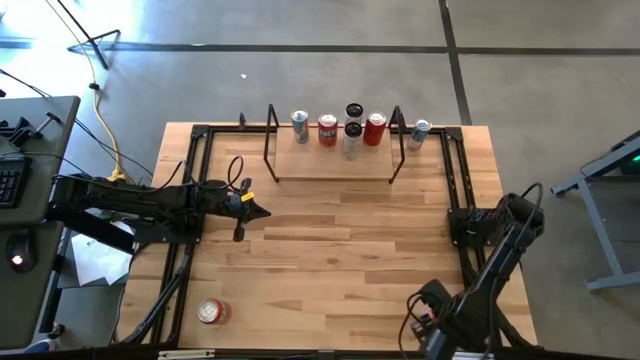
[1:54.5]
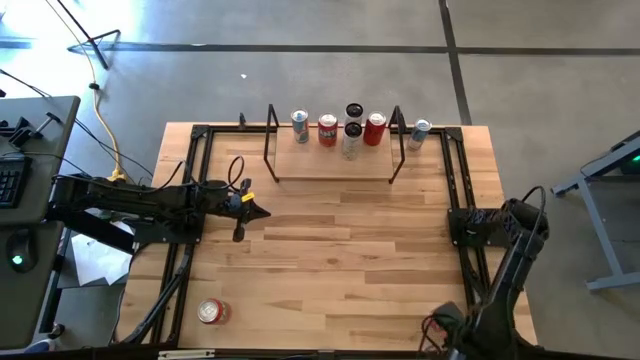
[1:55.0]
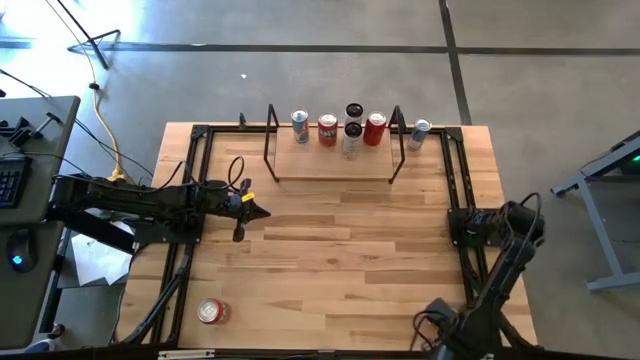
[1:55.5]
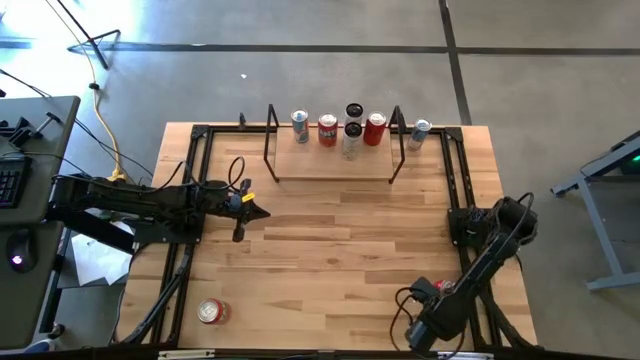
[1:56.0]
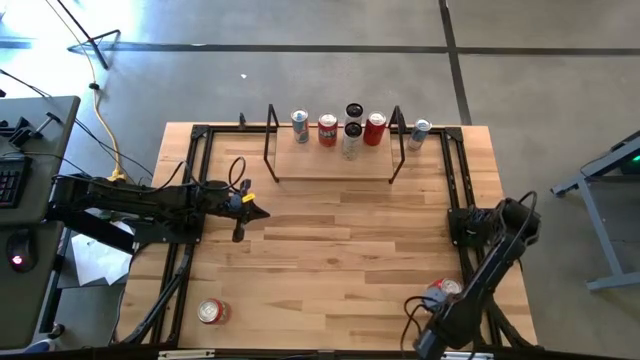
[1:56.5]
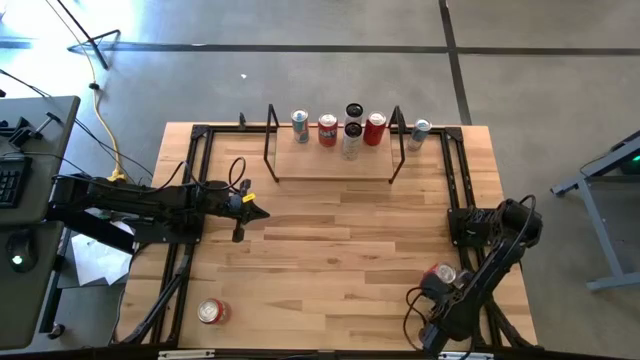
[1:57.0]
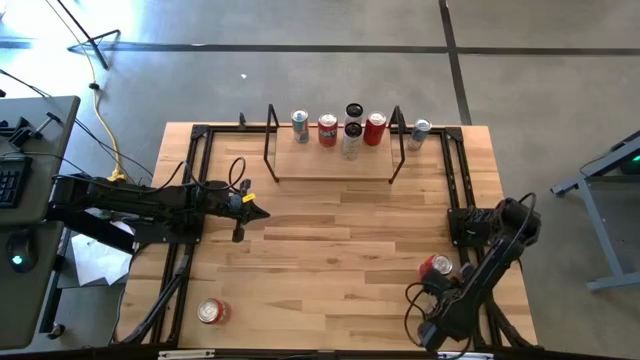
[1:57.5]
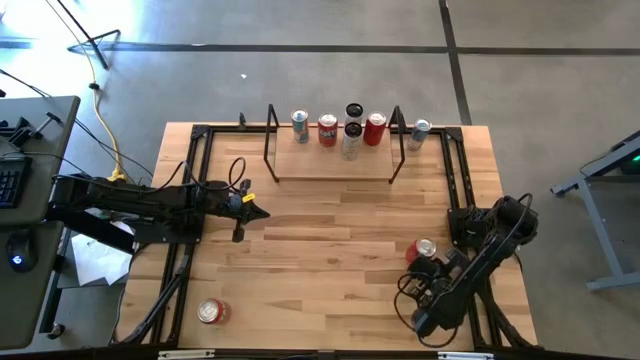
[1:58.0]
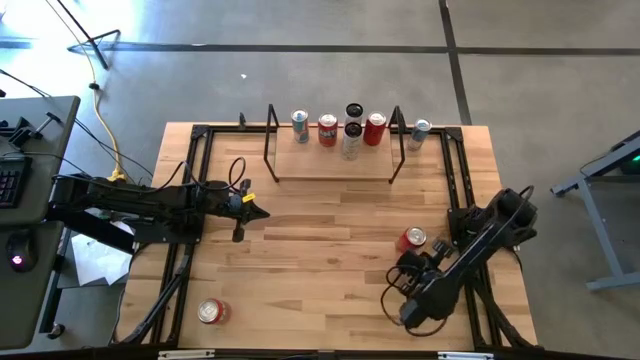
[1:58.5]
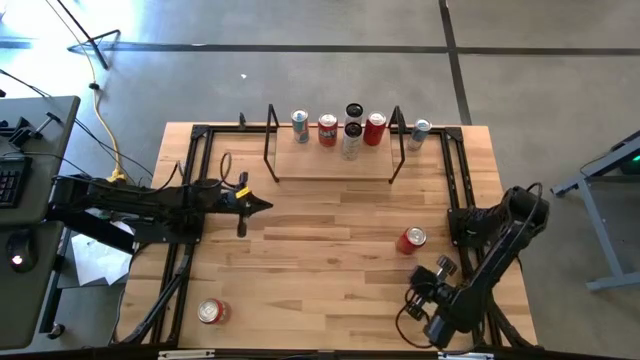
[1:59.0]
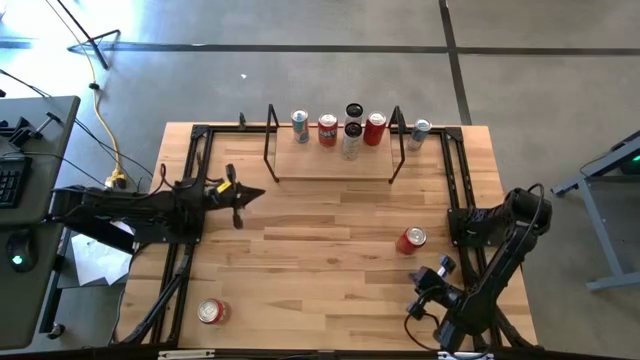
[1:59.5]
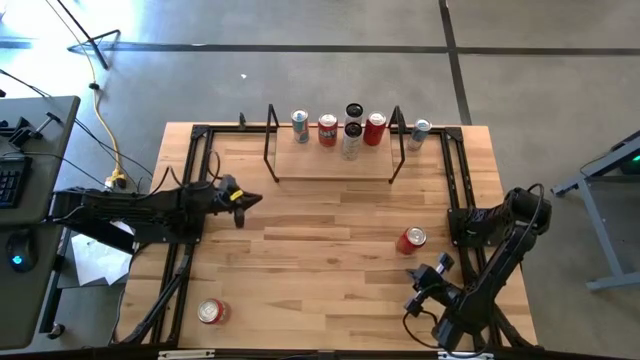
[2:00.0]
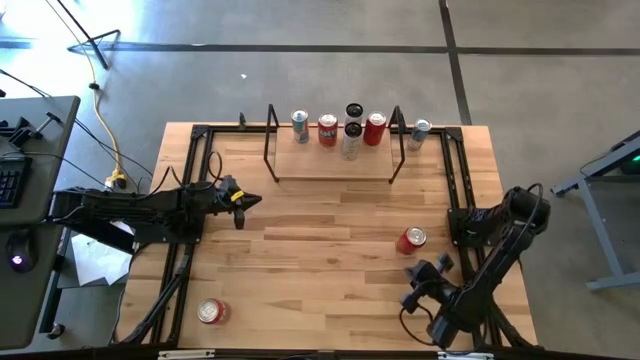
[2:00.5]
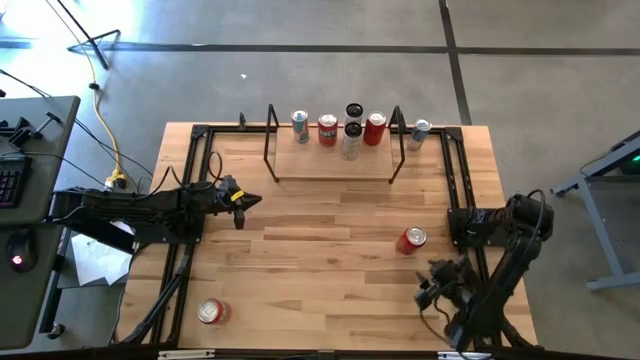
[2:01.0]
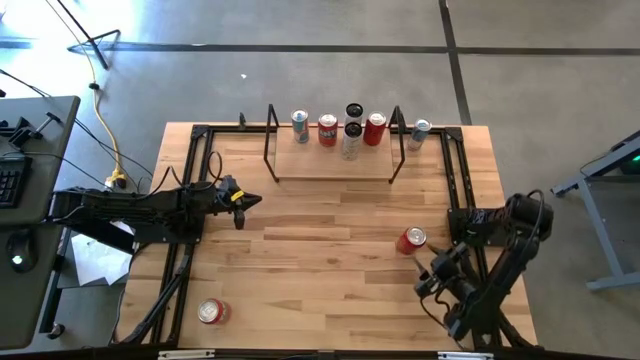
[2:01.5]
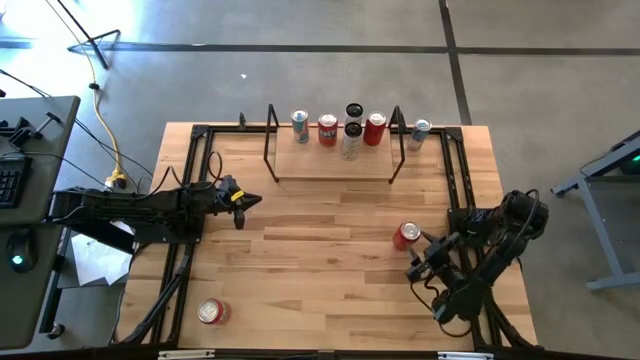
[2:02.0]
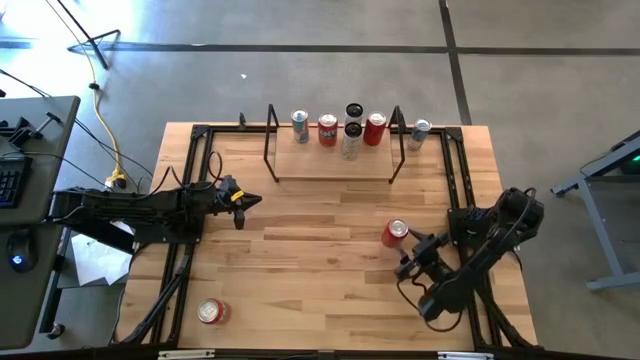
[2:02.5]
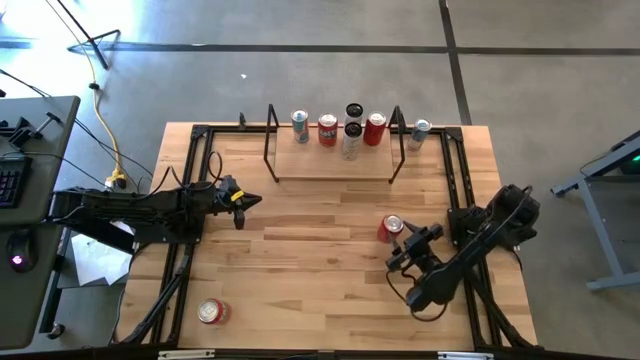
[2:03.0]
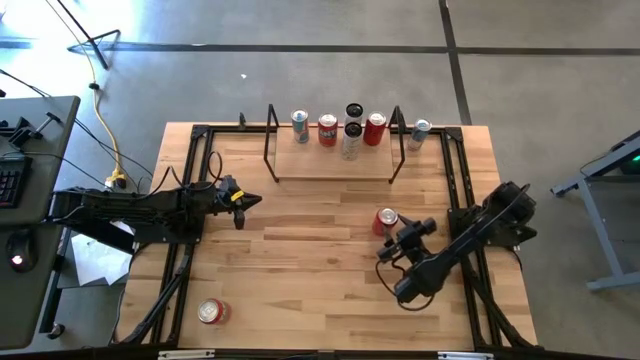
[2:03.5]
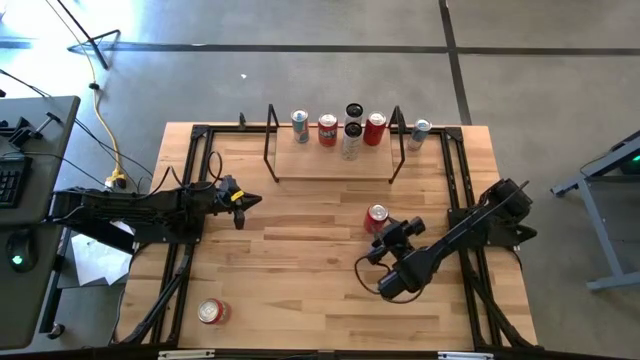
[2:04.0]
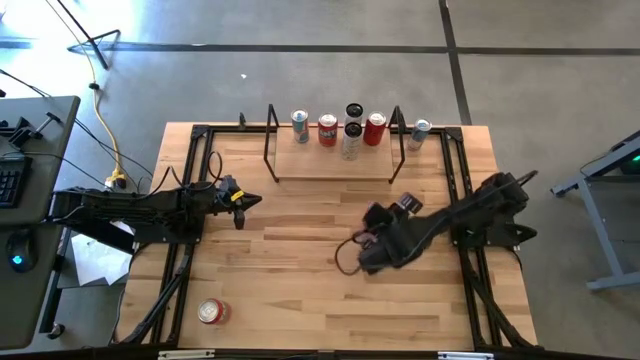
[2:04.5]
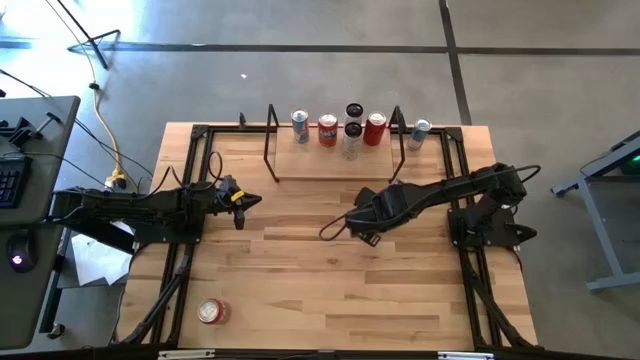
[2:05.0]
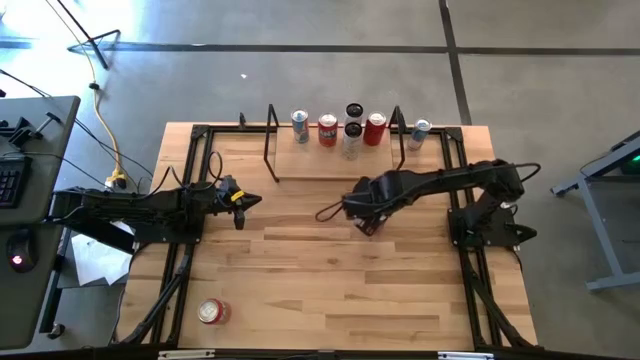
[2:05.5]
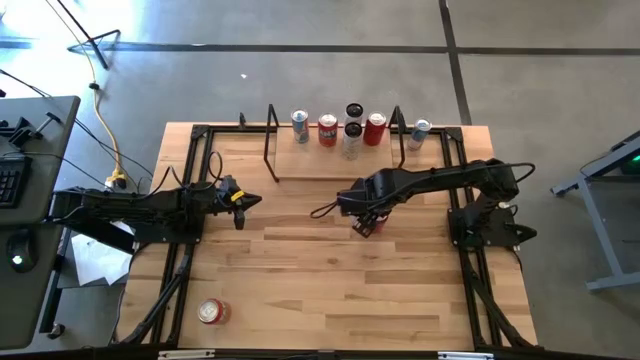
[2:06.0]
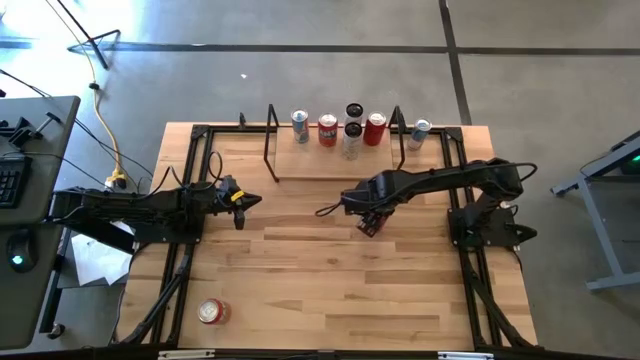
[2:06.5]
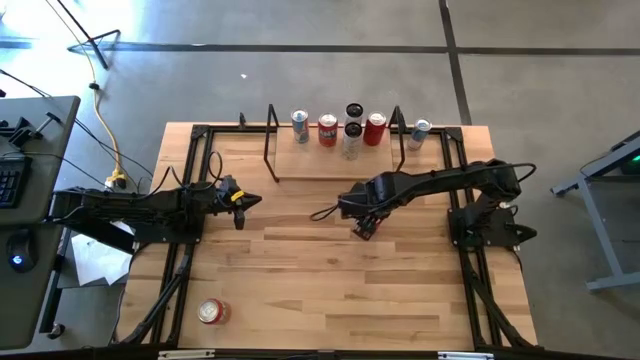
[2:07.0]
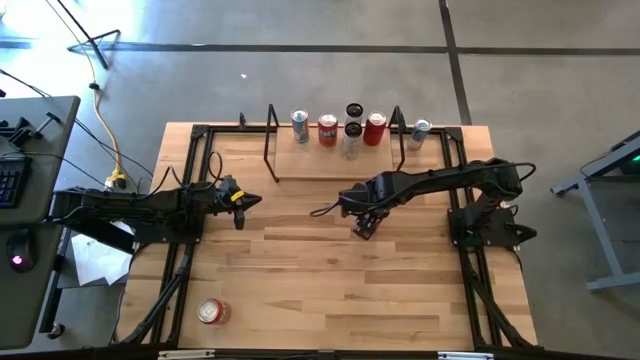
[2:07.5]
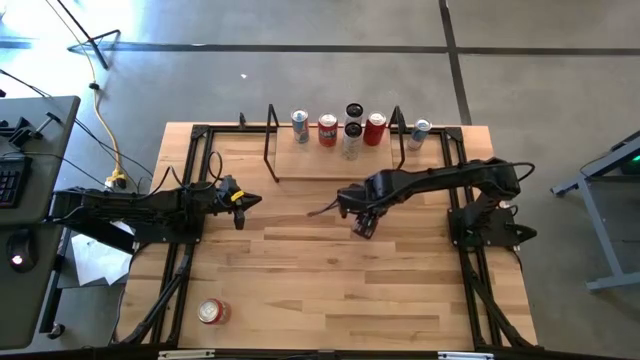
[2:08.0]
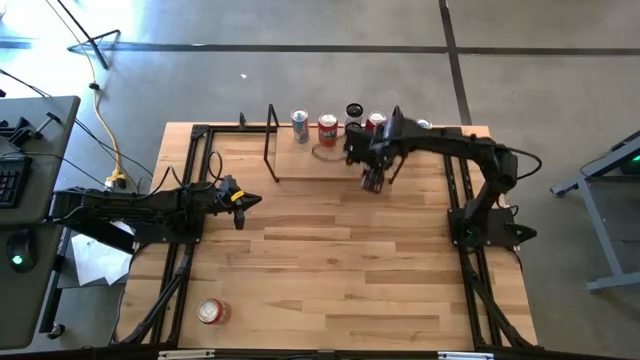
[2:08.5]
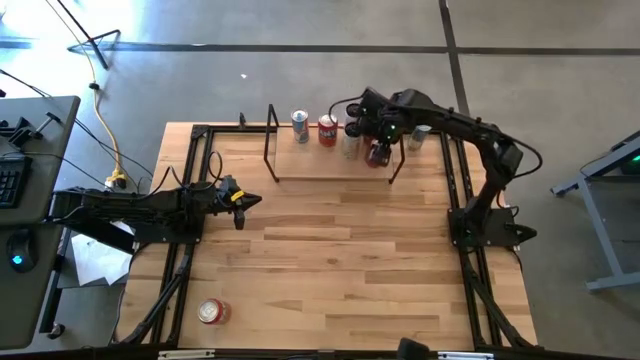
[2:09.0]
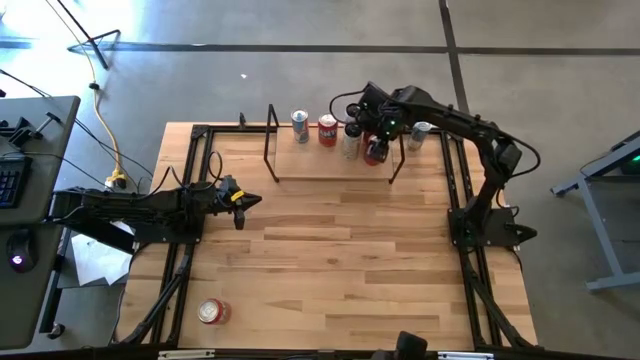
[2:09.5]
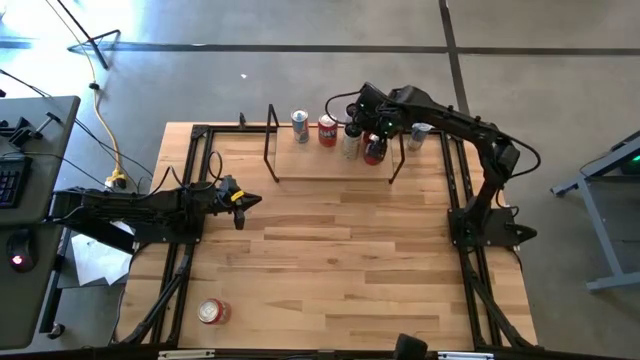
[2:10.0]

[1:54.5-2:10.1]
Task: Place canned beverage on shelf
Put the red-black soda can on the shelf aligned with the other red-black soda can

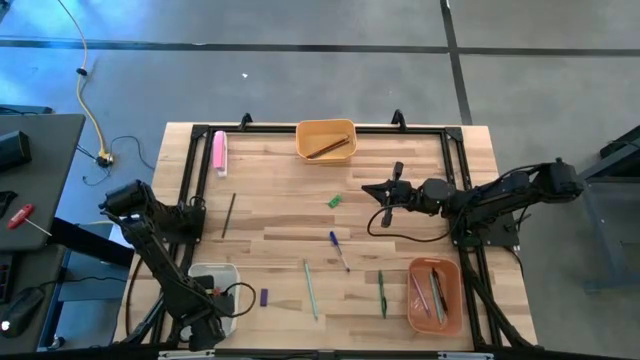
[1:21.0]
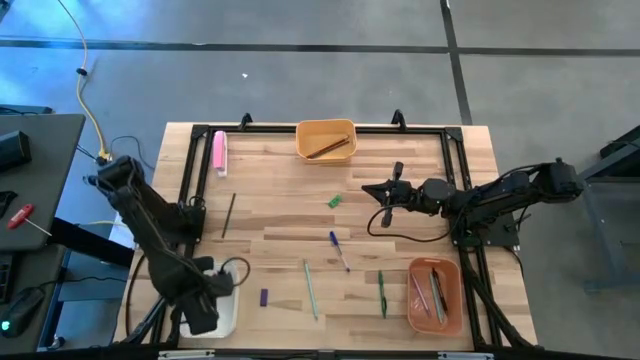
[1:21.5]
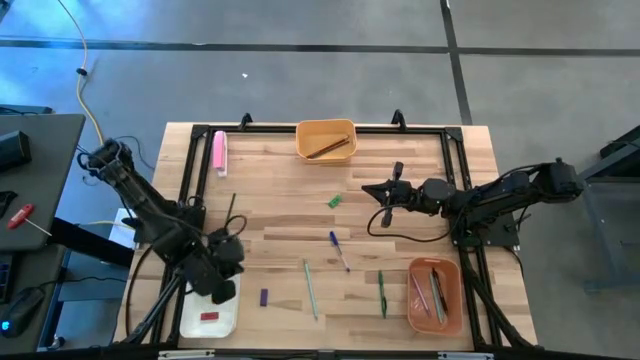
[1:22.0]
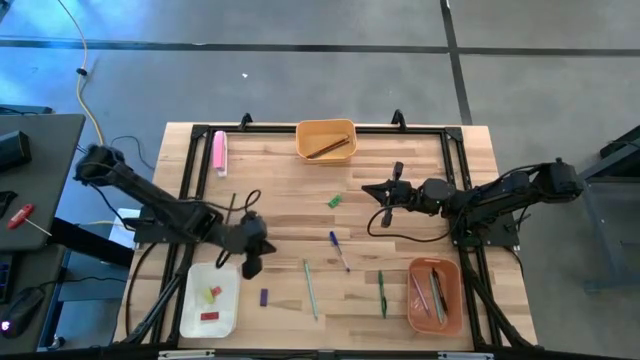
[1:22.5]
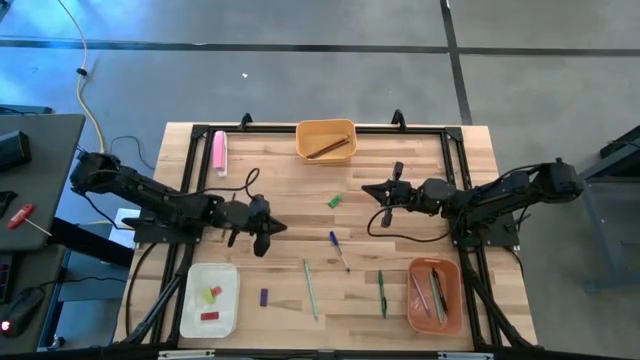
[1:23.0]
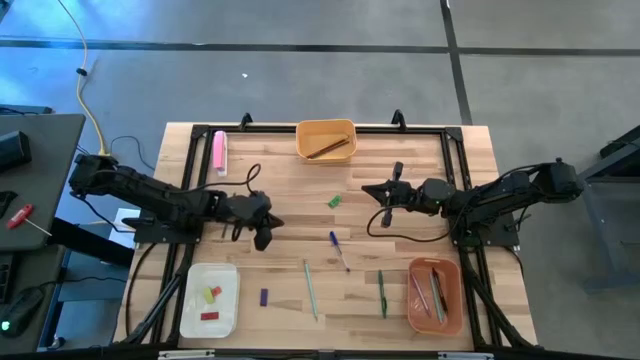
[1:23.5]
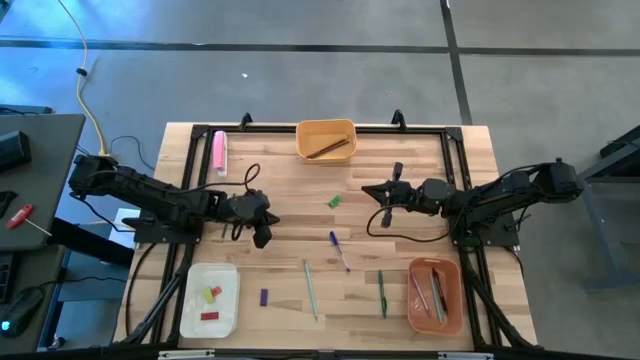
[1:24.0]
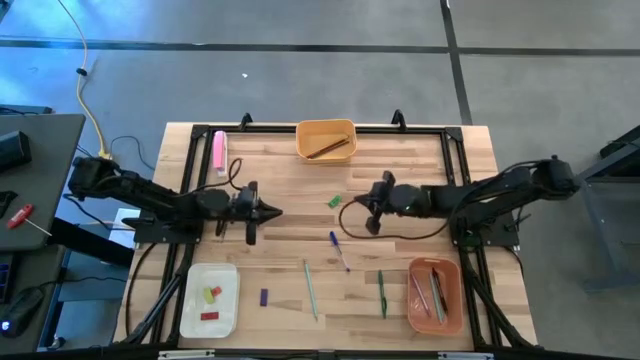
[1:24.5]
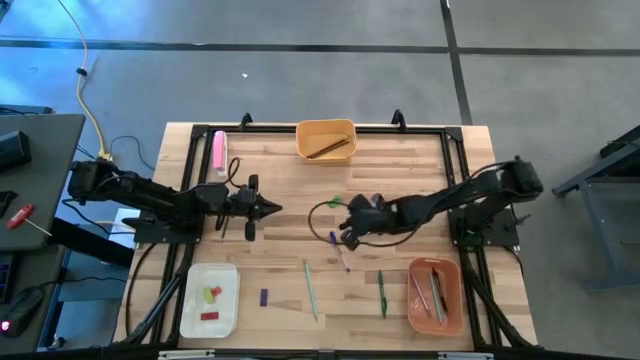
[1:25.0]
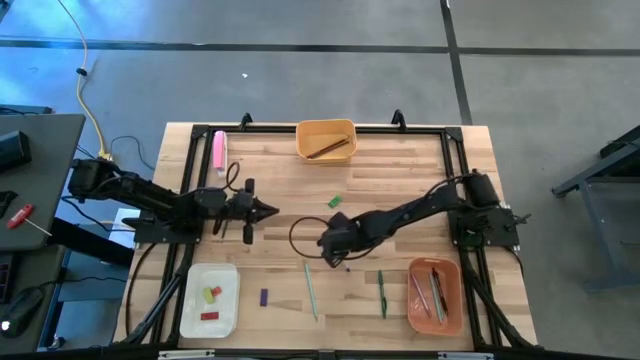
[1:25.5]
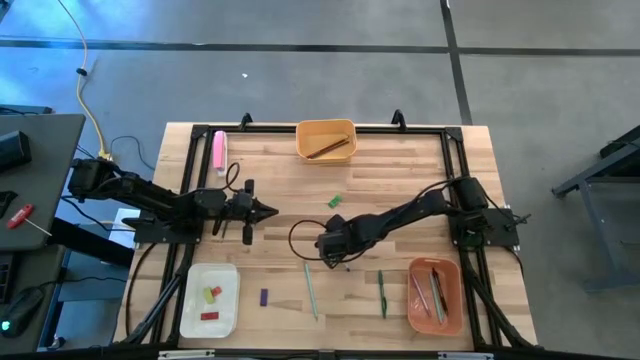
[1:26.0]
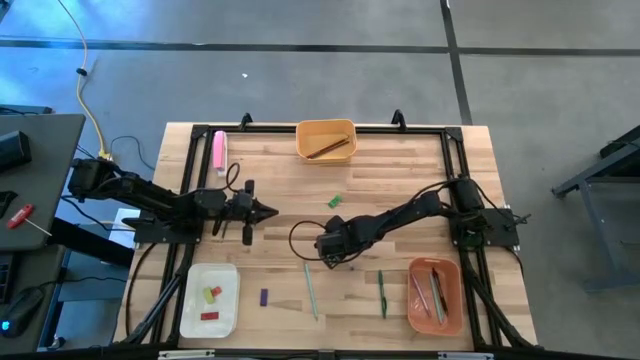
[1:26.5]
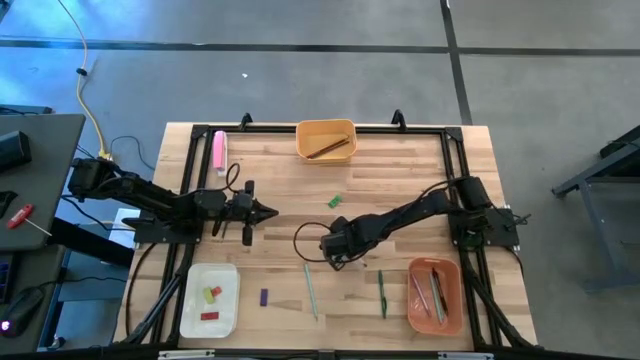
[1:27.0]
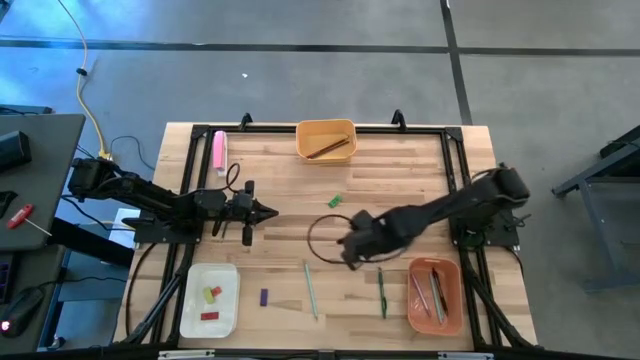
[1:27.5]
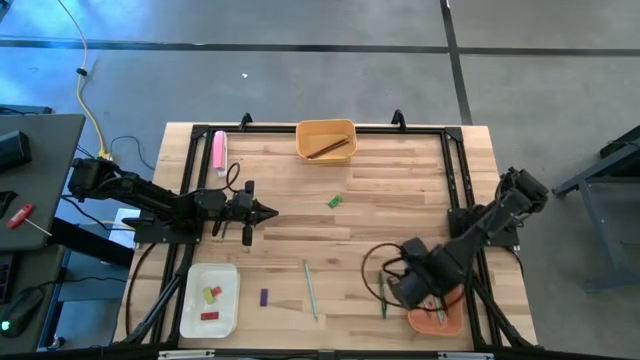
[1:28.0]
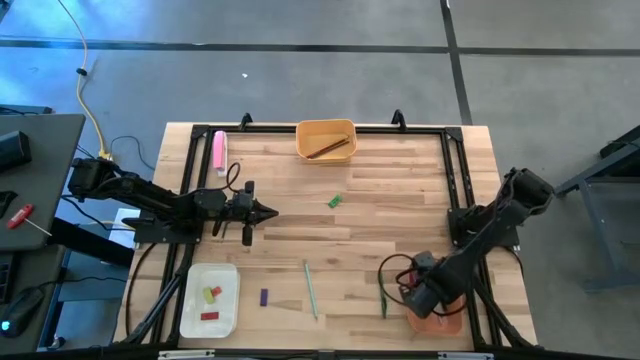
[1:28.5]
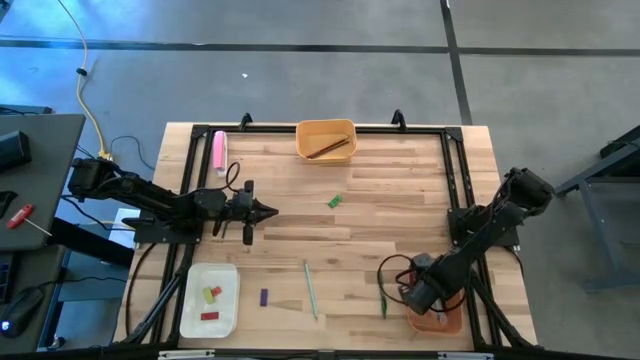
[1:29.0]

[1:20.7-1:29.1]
Task: Sort crayons/erasers/pens/pencils in bins
Put the blue pen into the orange bin
